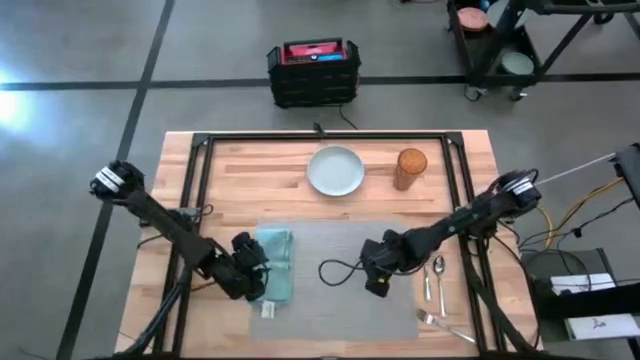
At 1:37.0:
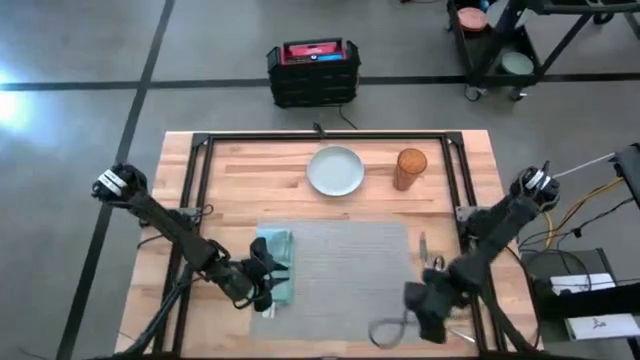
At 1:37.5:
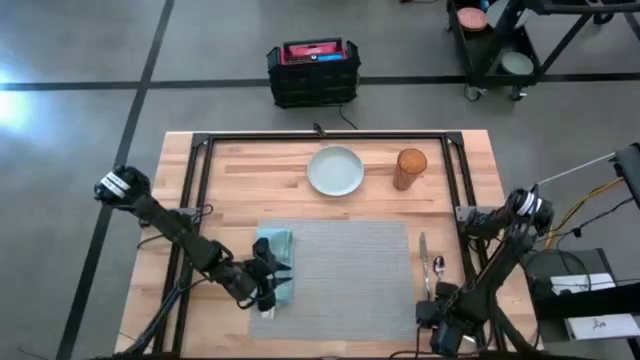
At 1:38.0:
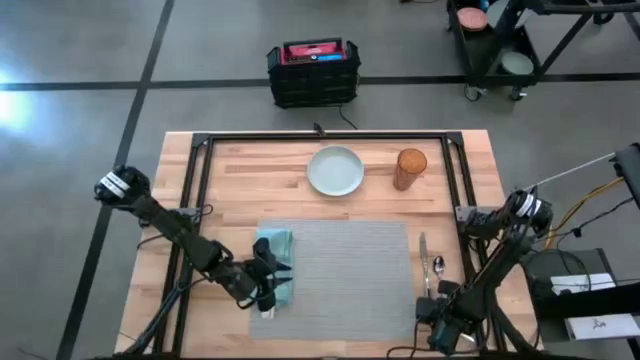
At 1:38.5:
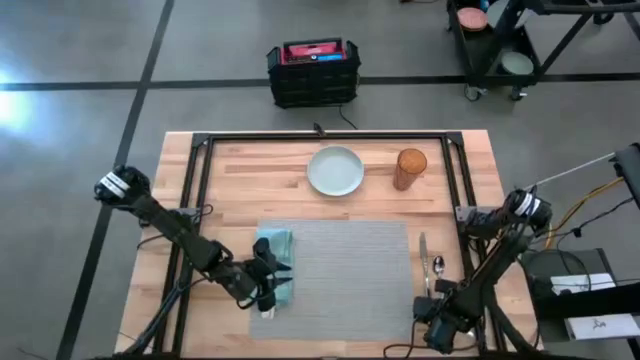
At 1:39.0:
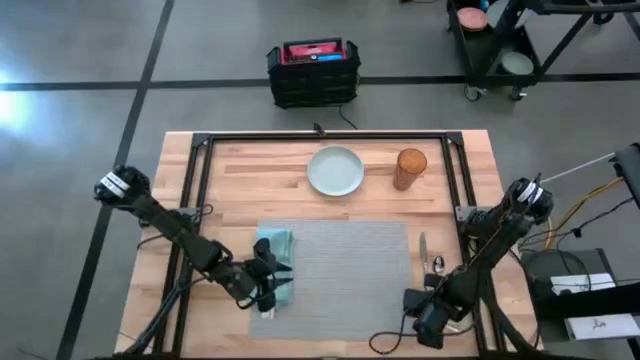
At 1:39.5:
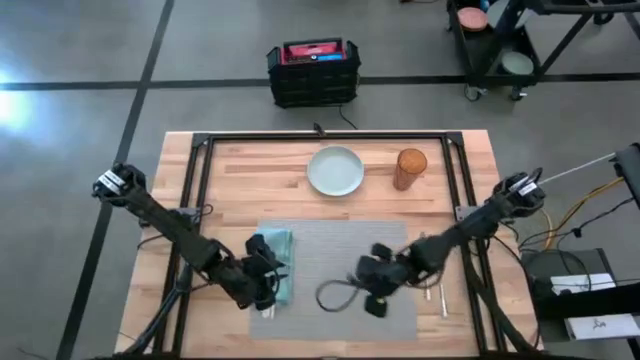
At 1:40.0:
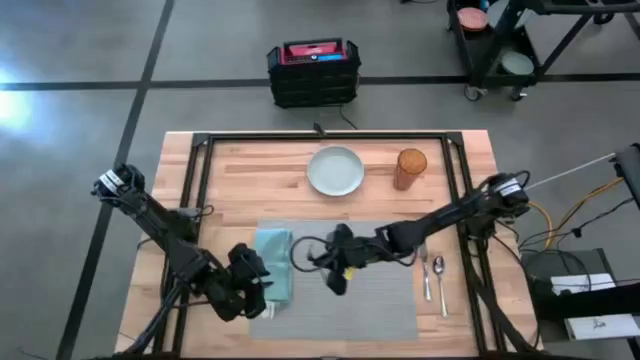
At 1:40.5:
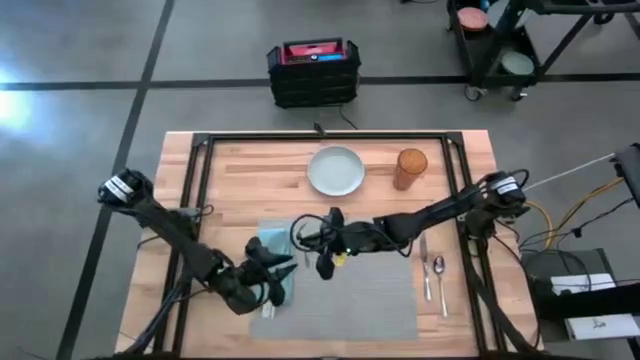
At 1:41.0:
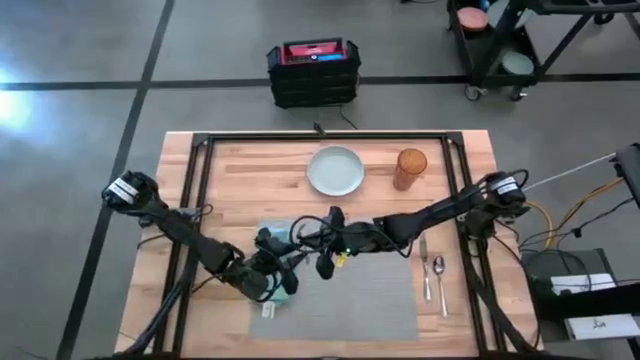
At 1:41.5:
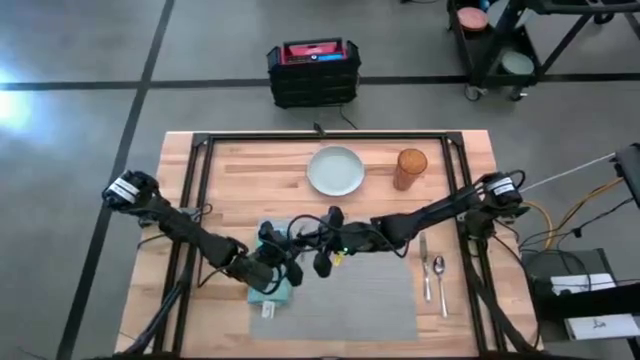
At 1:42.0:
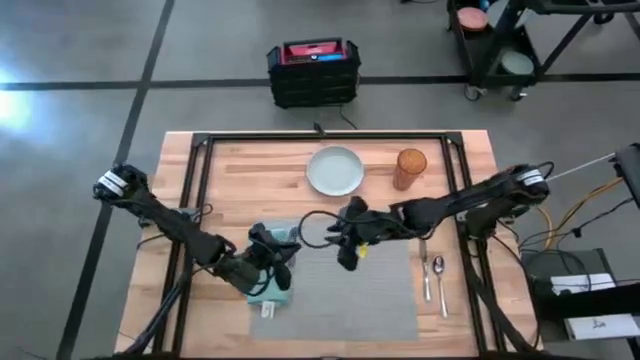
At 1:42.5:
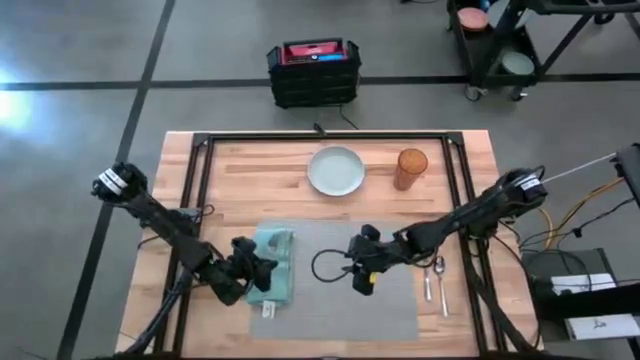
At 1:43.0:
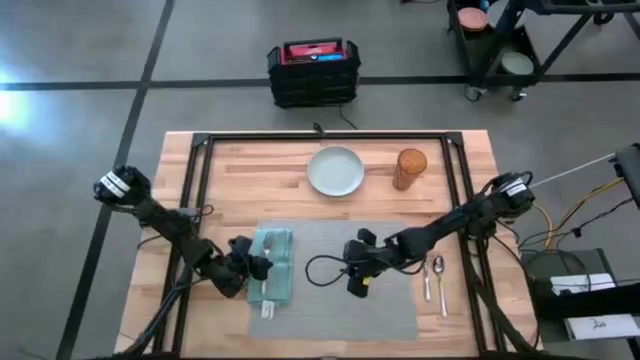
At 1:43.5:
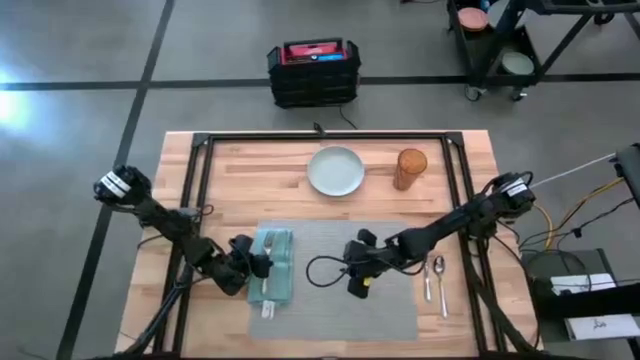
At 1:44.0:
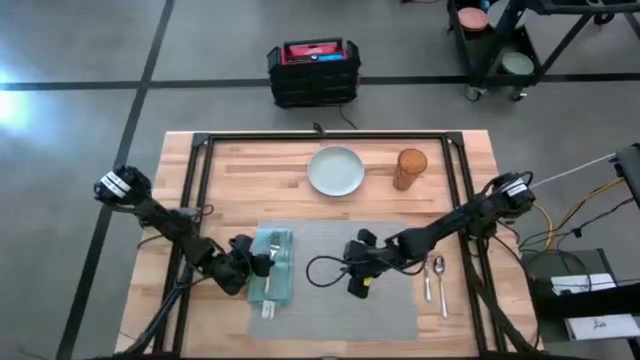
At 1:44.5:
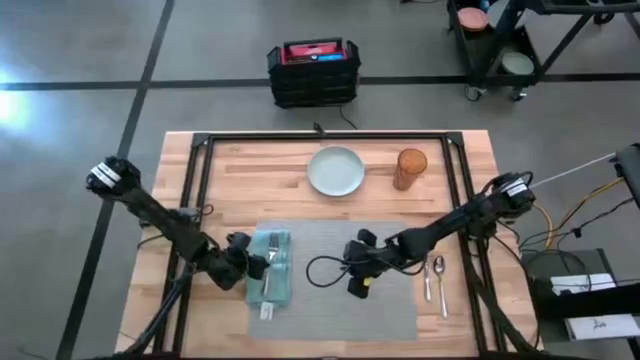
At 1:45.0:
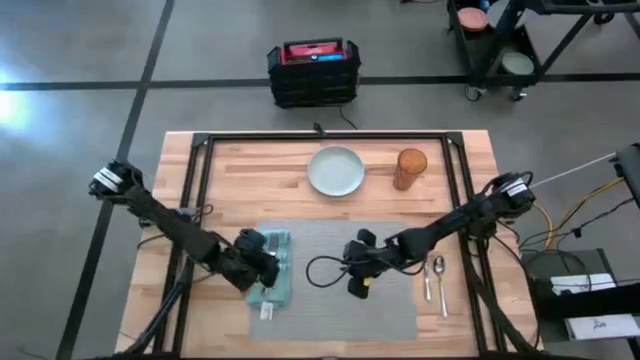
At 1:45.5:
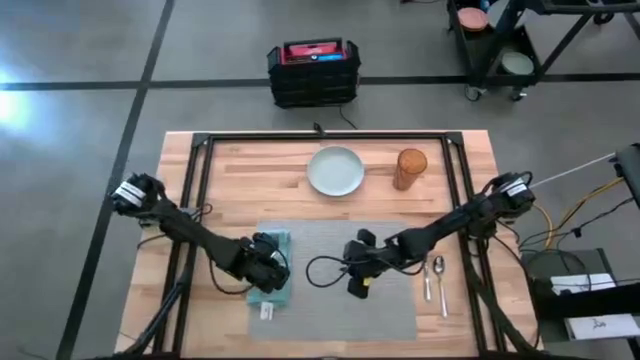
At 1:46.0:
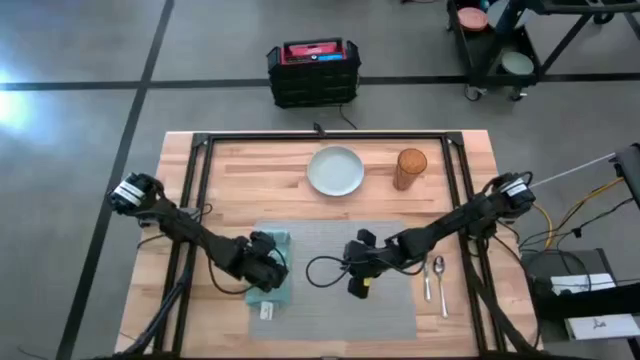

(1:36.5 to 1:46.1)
Task: Set table place
Put the fork on the table napkin

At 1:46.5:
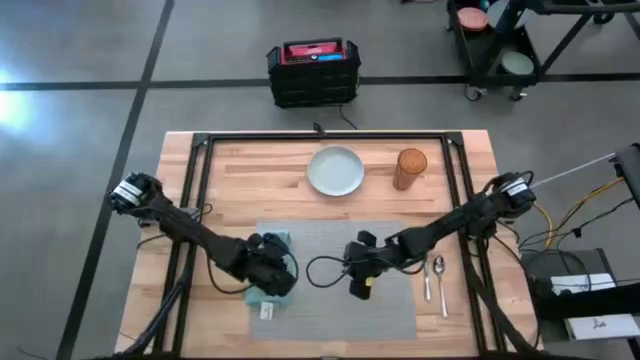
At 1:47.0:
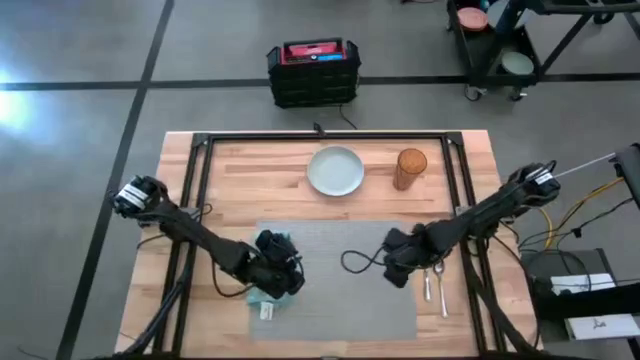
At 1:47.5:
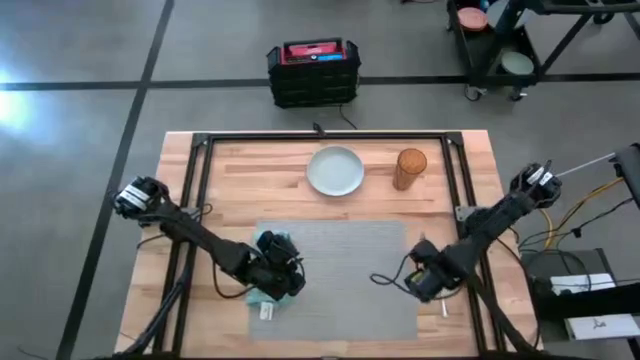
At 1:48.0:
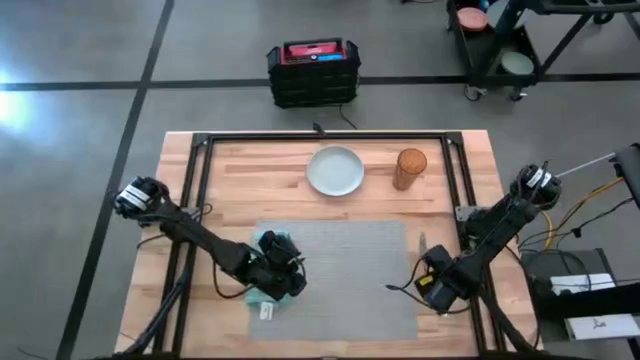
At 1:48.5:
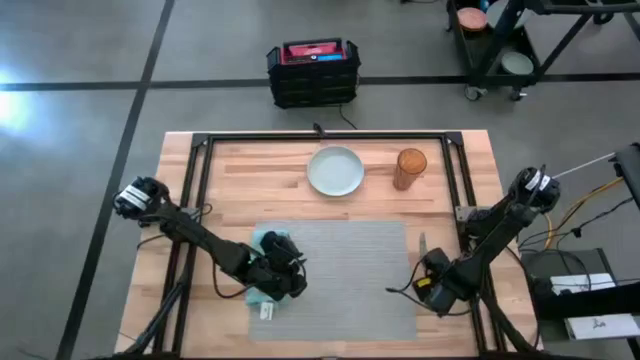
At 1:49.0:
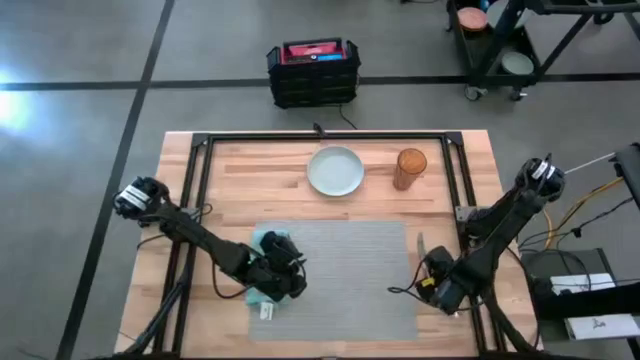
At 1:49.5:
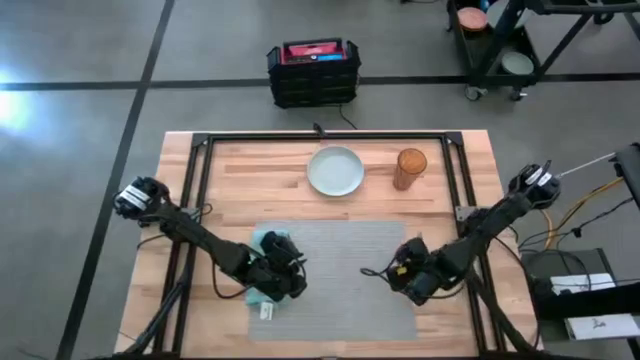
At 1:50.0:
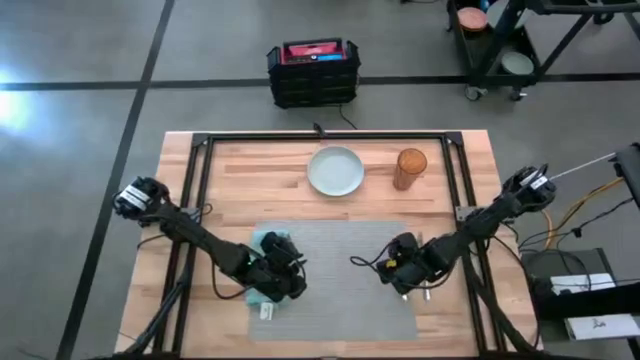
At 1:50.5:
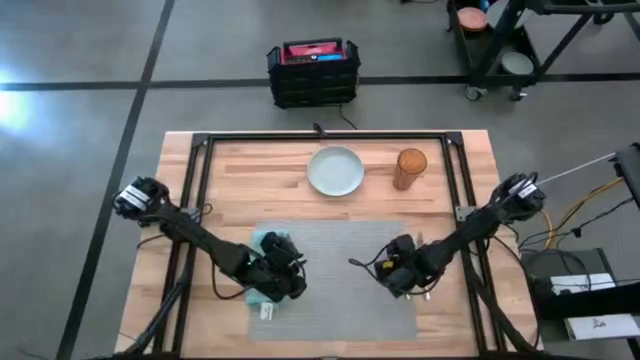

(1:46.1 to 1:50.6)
Put the spoon on the table mat

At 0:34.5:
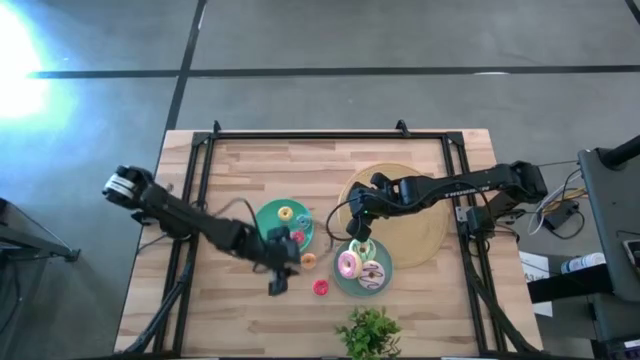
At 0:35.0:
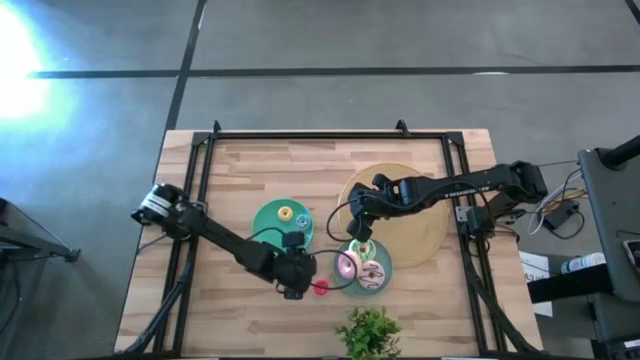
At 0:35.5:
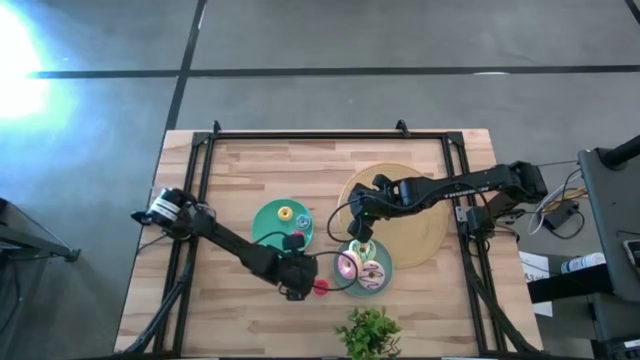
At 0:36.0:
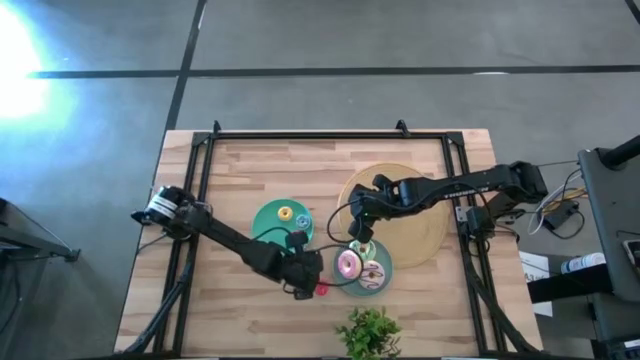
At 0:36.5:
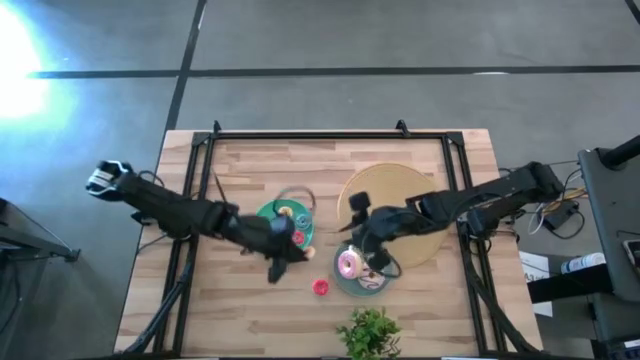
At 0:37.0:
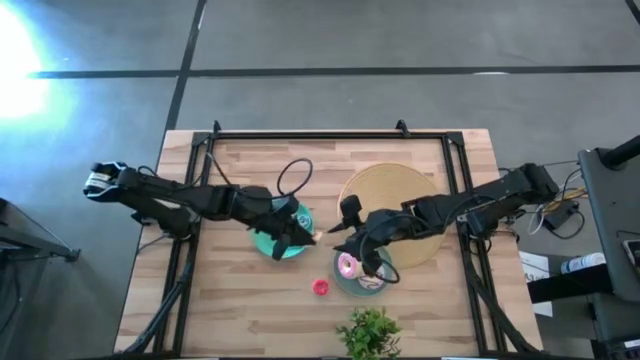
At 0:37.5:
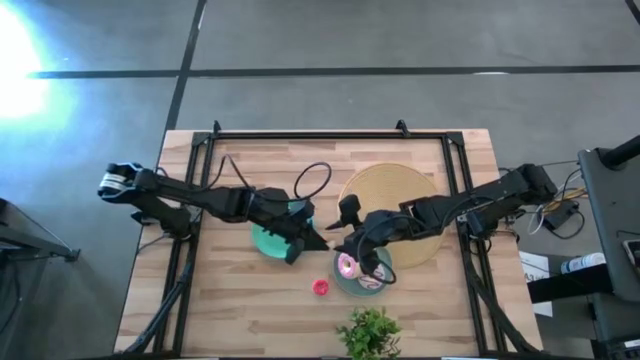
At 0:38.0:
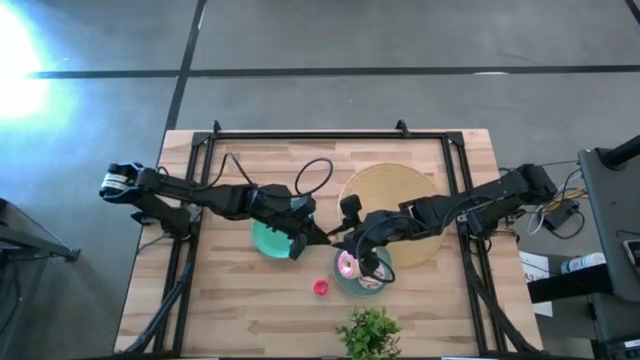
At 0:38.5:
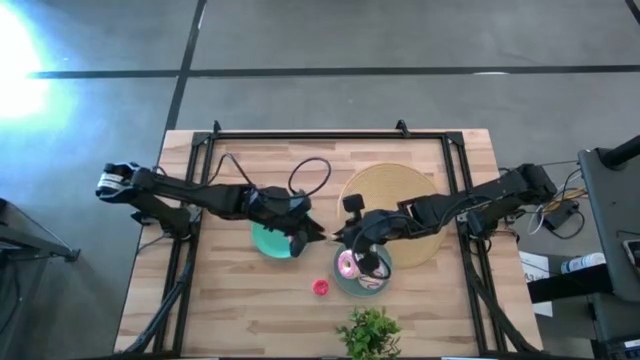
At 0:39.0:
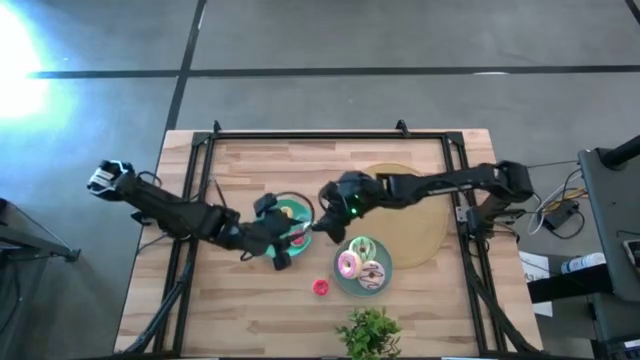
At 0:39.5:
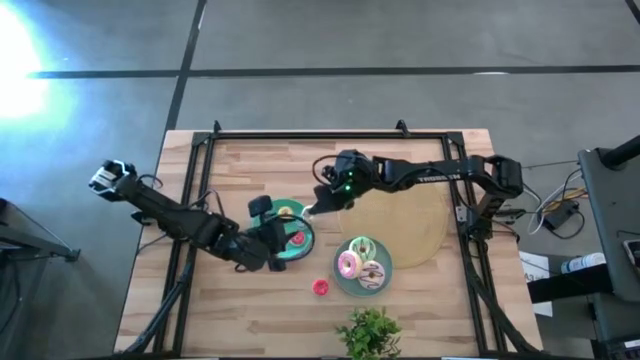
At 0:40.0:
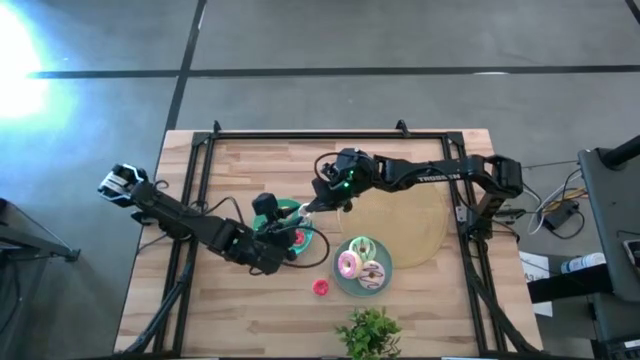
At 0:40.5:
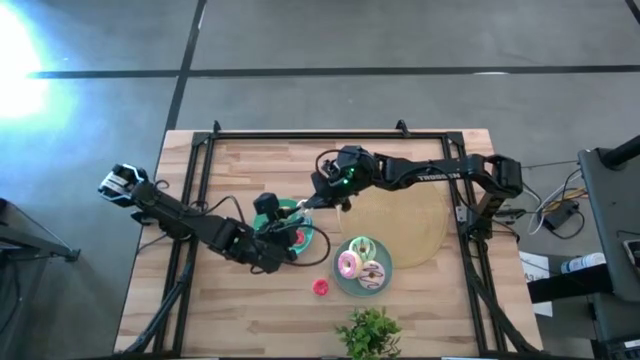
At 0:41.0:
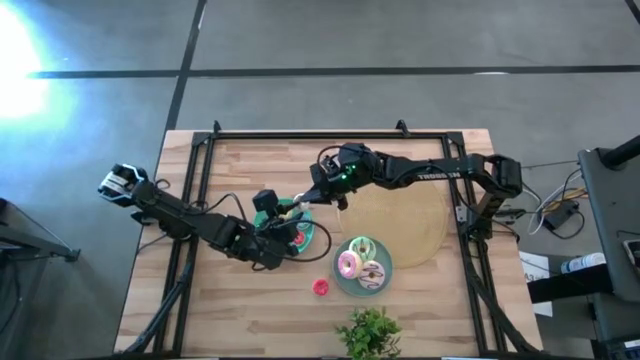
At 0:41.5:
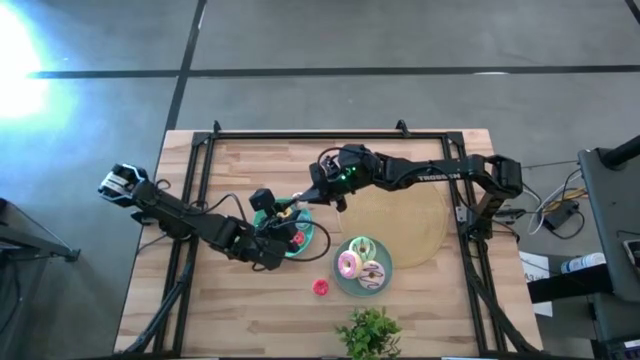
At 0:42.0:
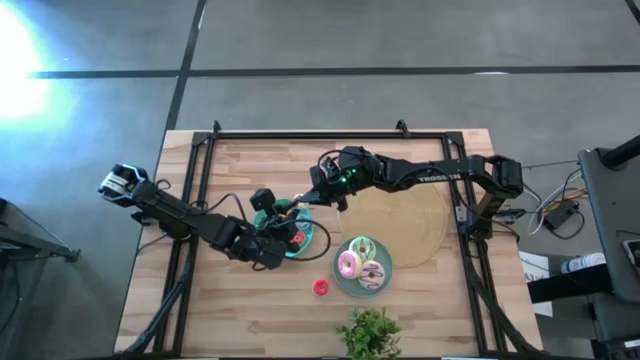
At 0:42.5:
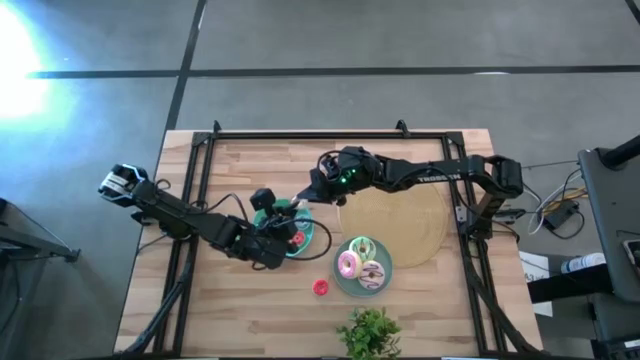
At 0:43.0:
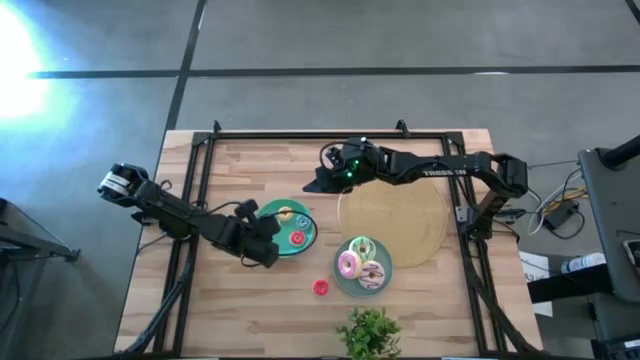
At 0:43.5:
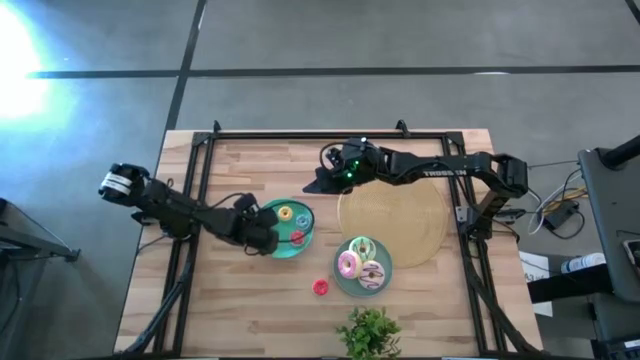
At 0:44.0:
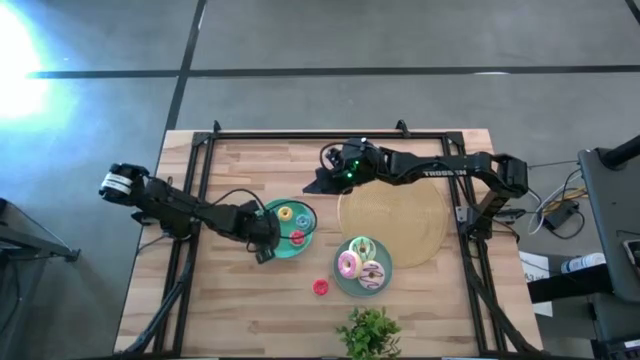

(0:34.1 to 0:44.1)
Task: Pick & Place donuts
Put the small white donut on the green plate
